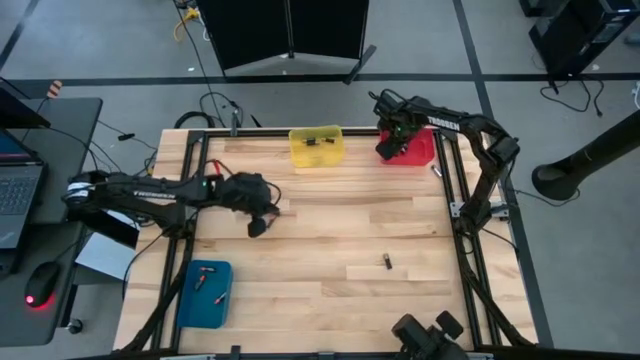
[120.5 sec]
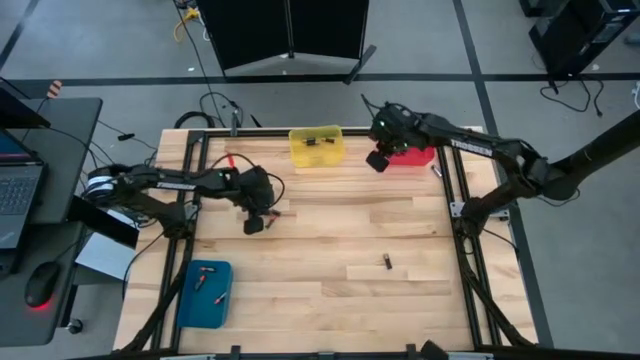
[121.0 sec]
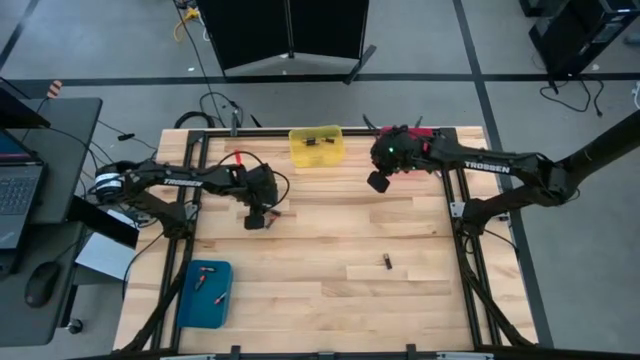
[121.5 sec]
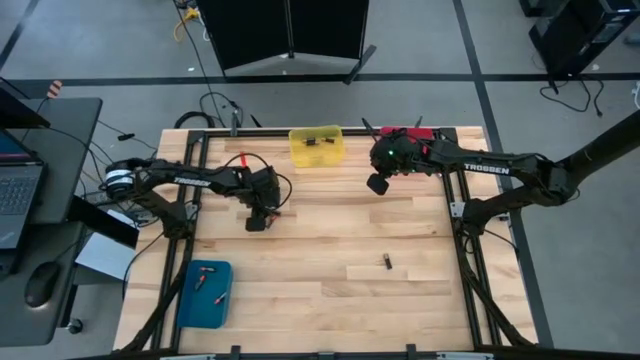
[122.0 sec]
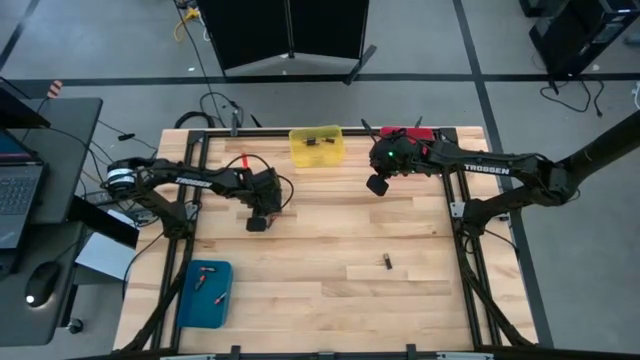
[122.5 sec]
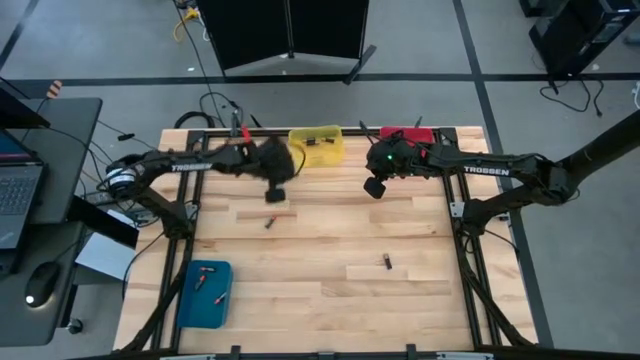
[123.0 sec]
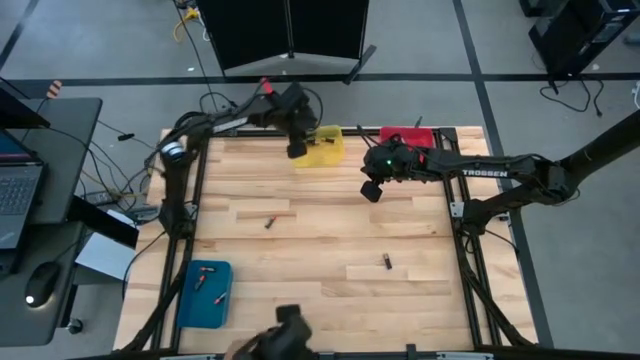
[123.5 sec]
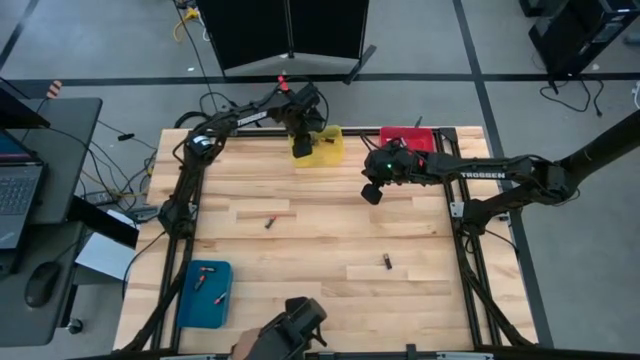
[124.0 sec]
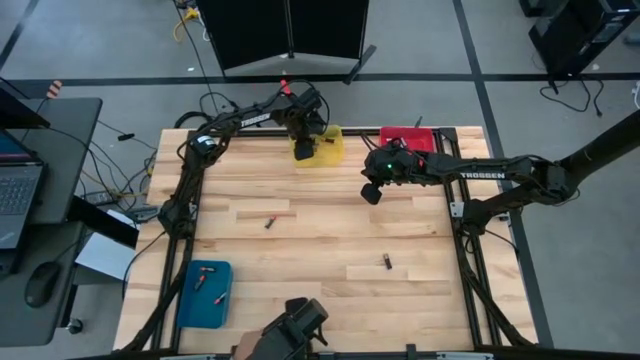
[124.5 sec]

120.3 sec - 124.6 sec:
Task: Sort batteries
Put the black-brown battery into the yellow bin

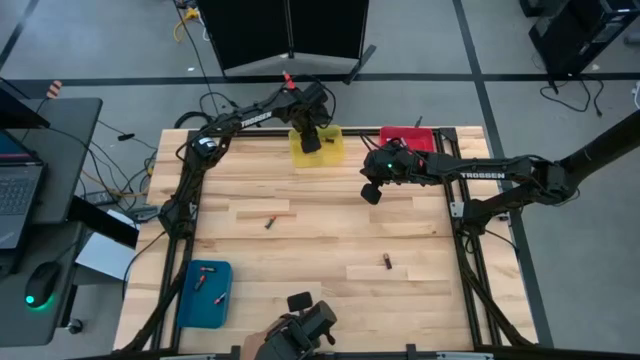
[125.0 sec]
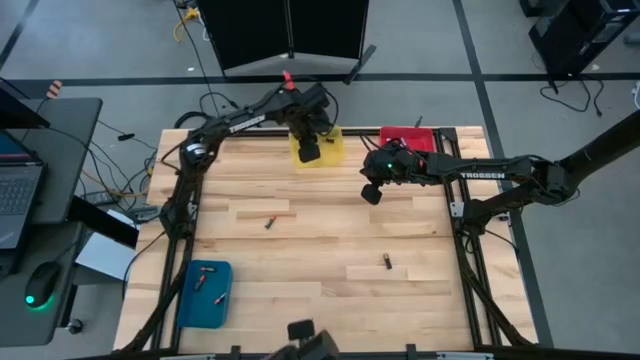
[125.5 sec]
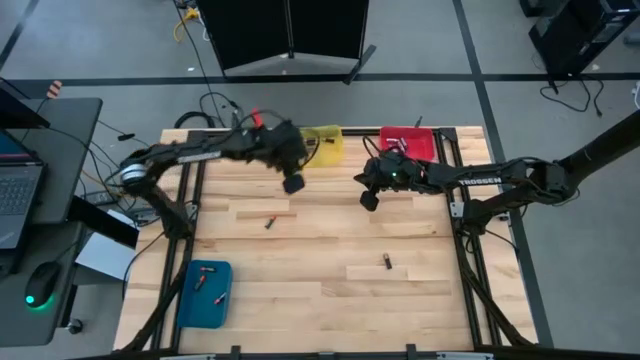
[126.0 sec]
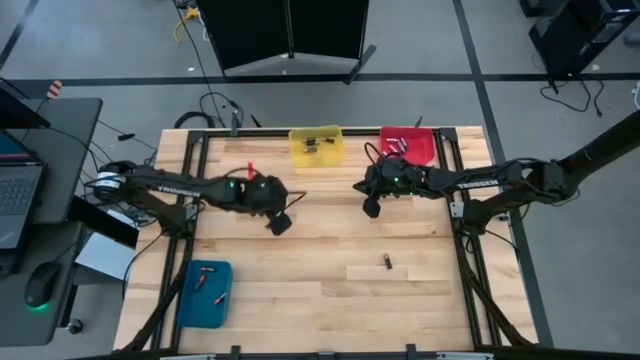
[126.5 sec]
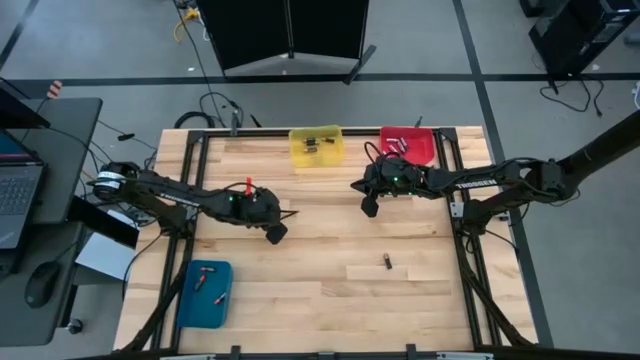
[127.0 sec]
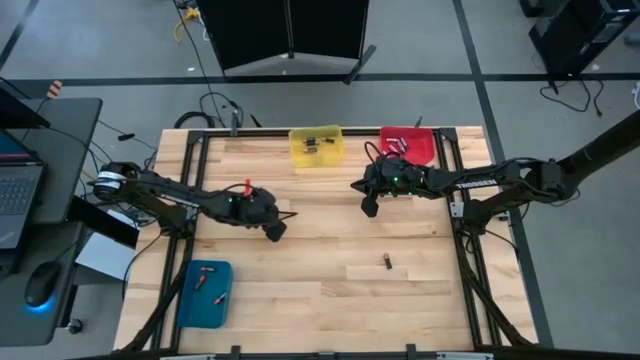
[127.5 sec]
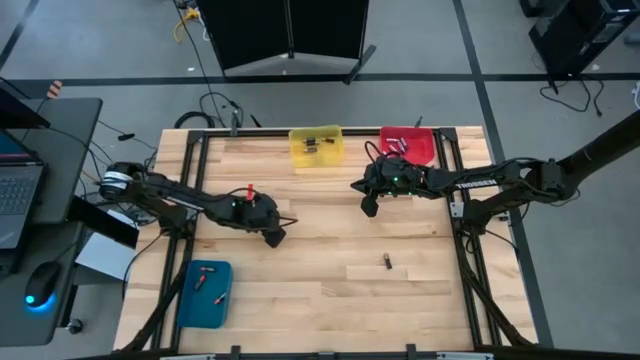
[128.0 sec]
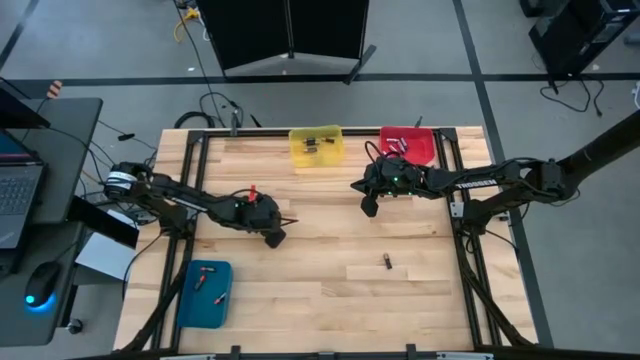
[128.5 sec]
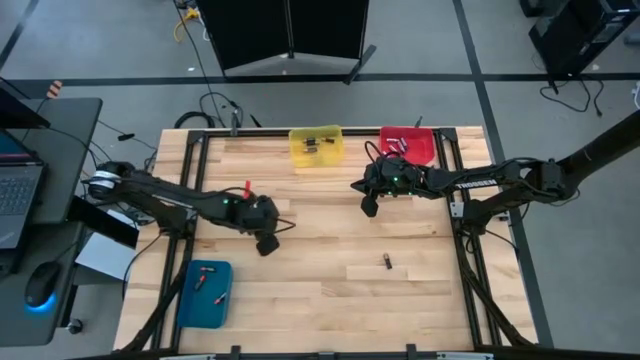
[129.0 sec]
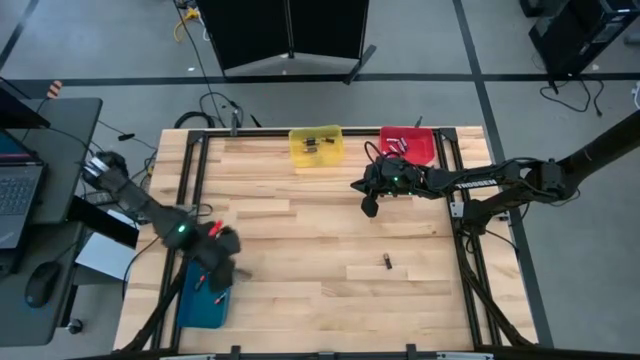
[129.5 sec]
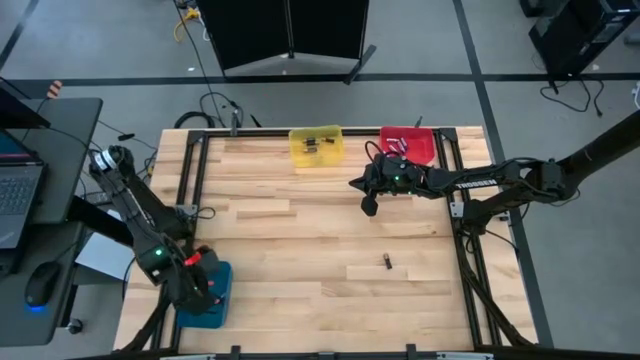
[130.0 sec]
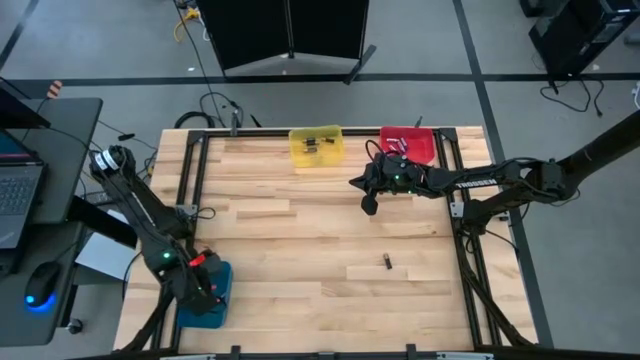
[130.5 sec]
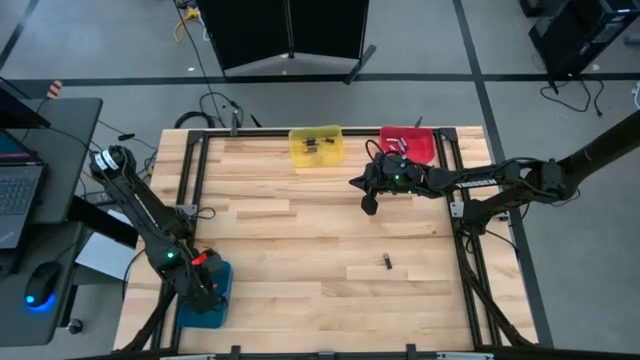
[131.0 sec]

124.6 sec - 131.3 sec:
Put the black-red battery into the blue bin

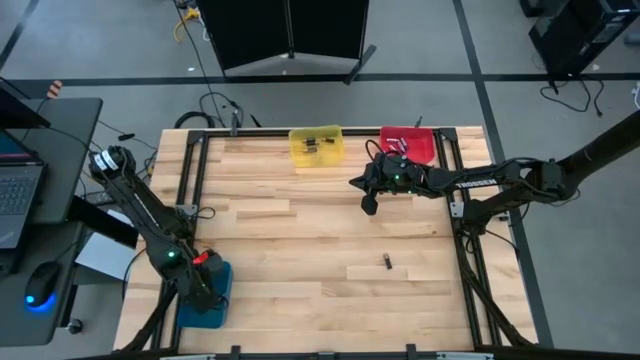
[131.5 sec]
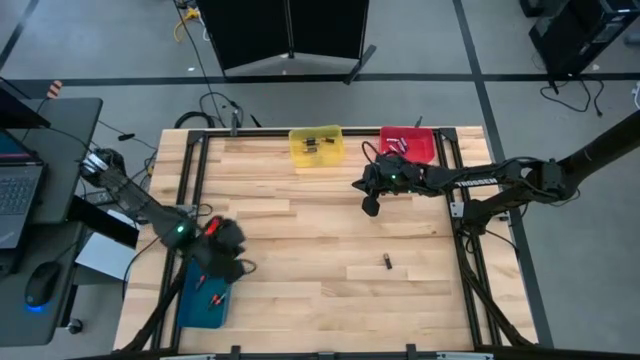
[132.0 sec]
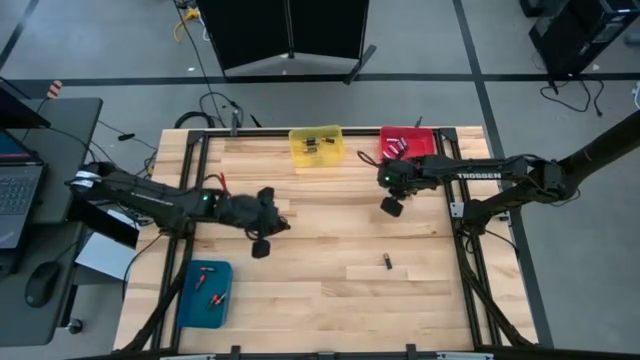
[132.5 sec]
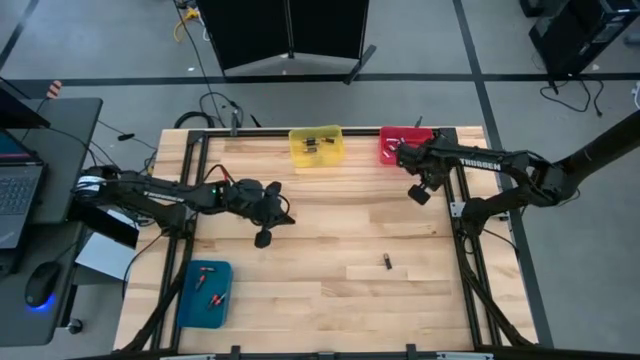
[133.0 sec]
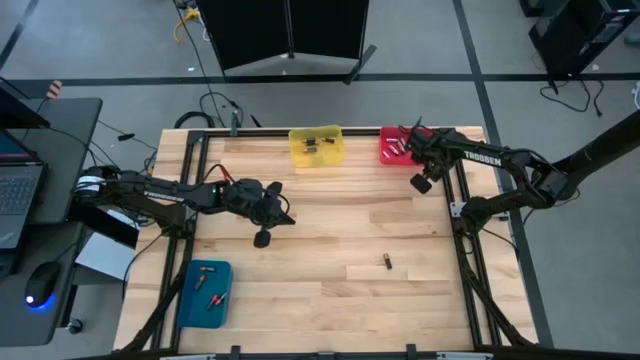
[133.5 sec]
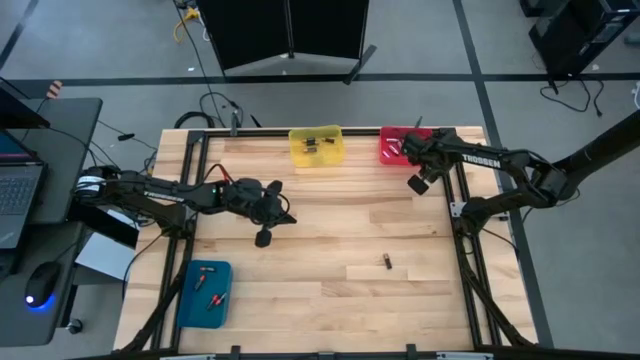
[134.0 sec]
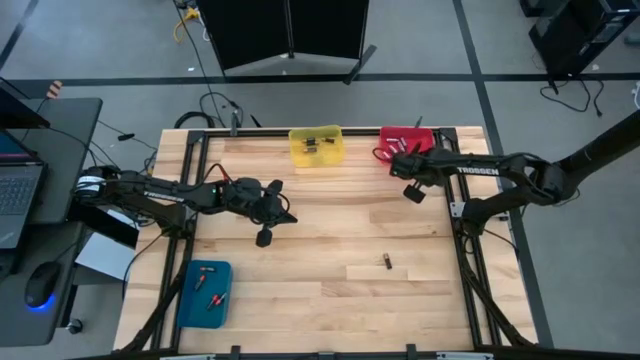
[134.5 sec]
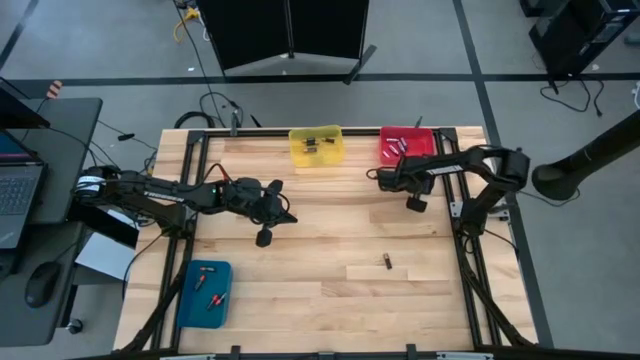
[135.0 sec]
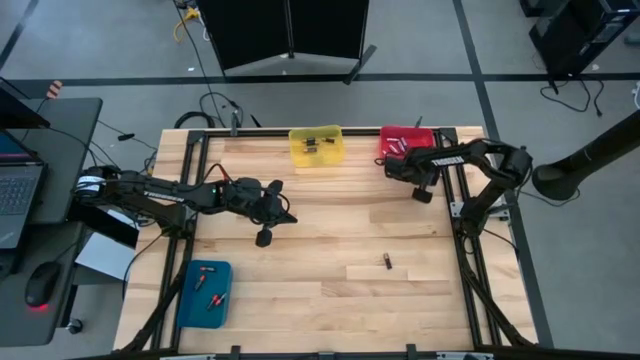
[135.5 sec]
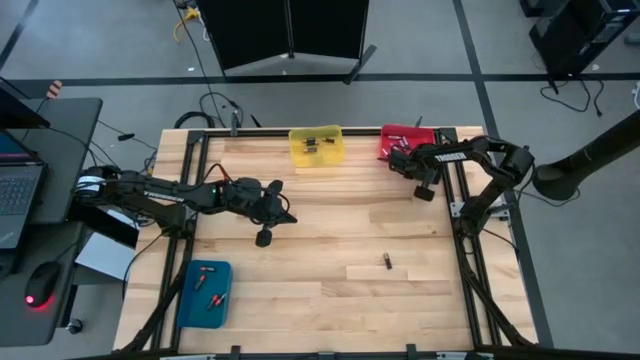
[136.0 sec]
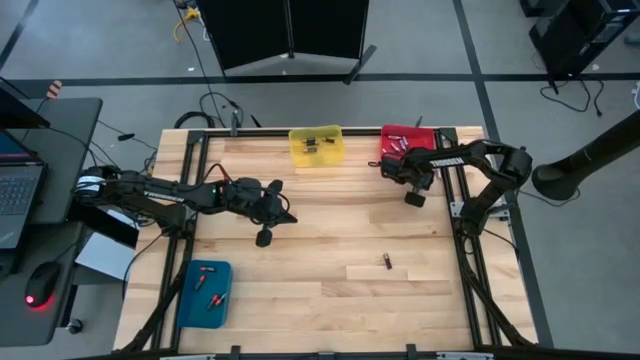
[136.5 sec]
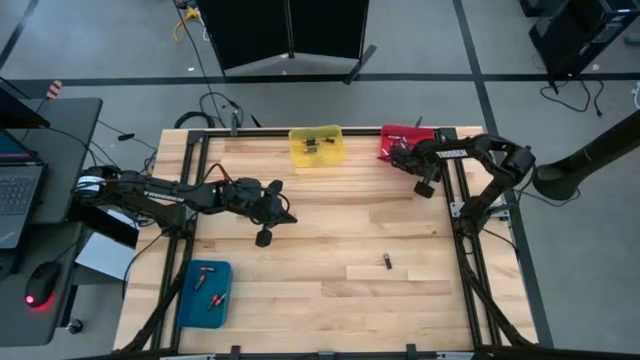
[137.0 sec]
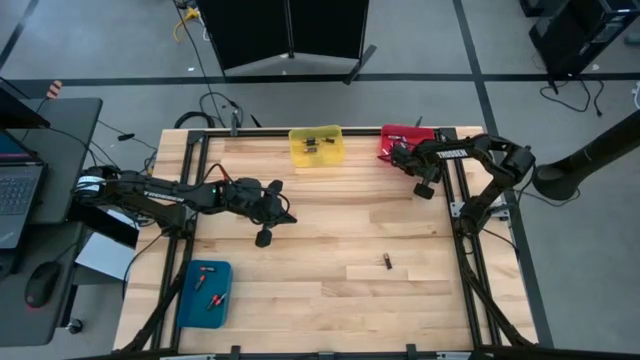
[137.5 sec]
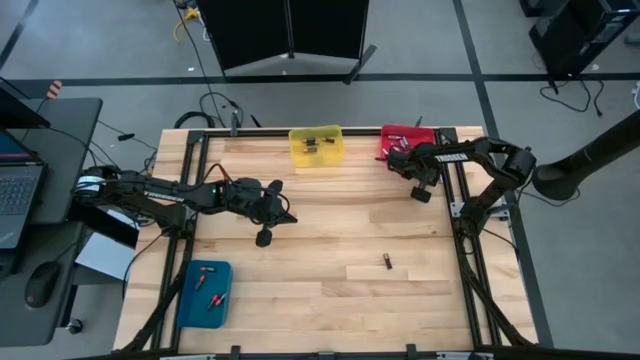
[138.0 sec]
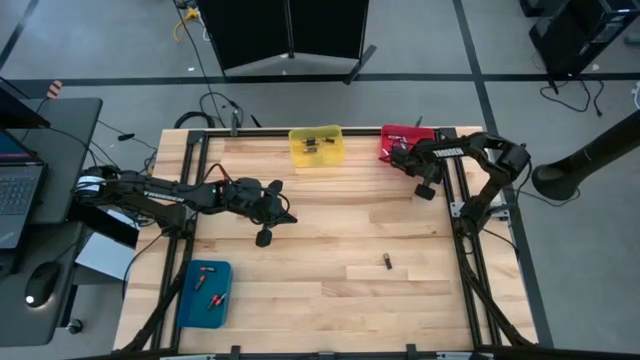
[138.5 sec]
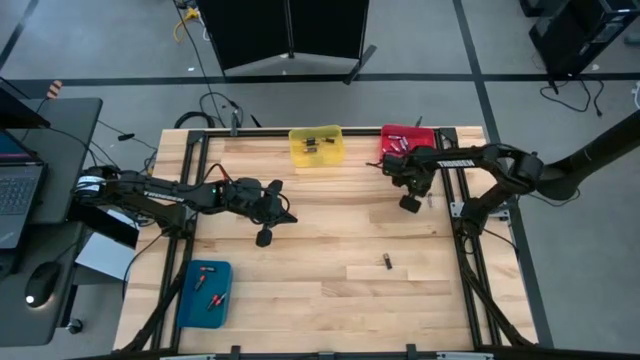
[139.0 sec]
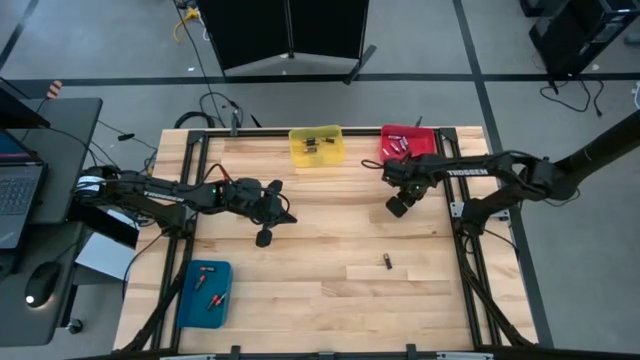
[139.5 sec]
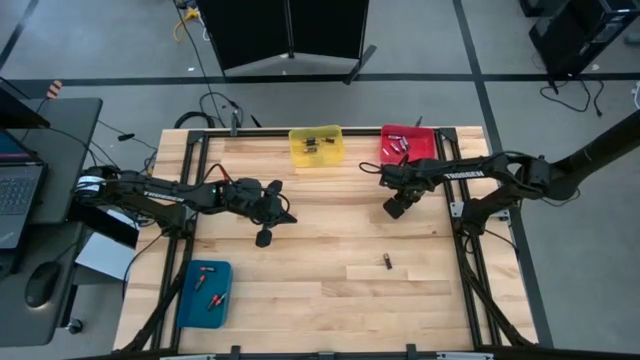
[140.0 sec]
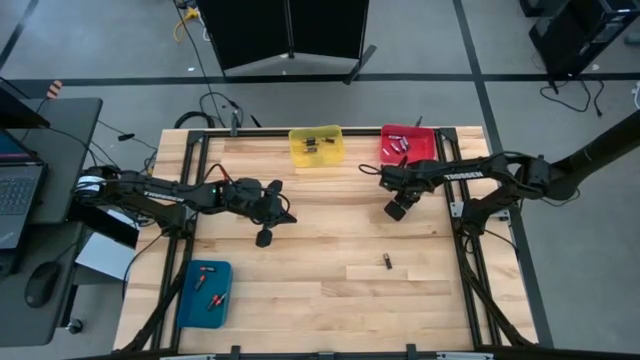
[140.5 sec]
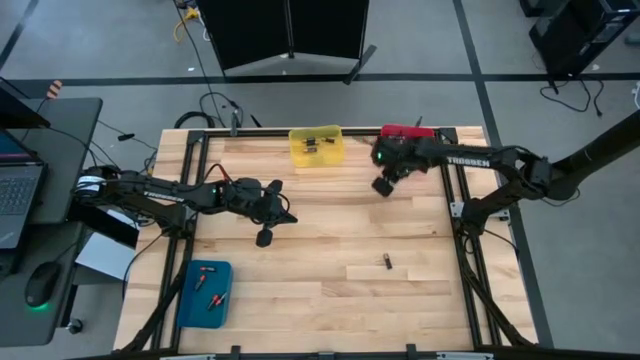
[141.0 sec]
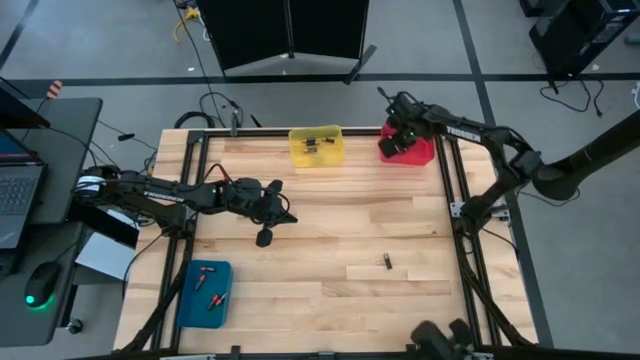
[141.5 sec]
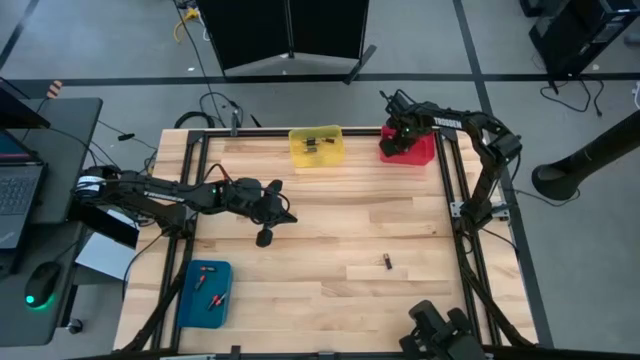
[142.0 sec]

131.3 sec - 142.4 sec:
Put the silver battery into the red bin
